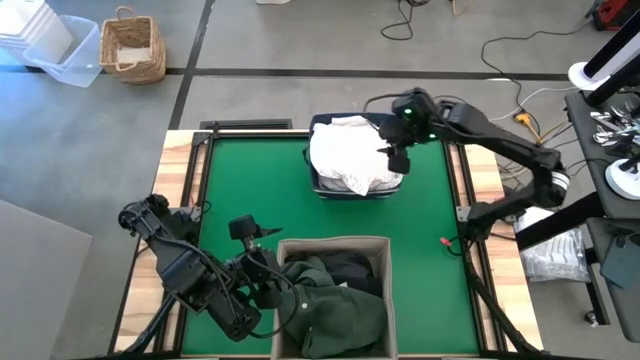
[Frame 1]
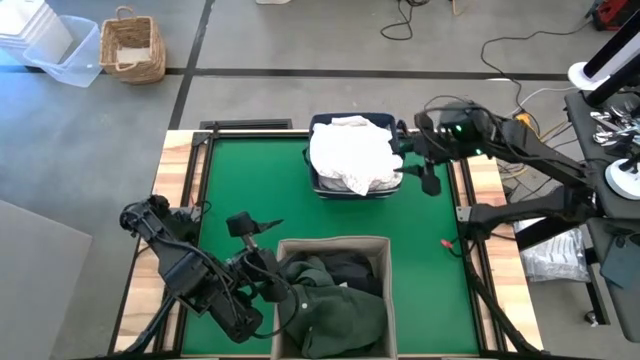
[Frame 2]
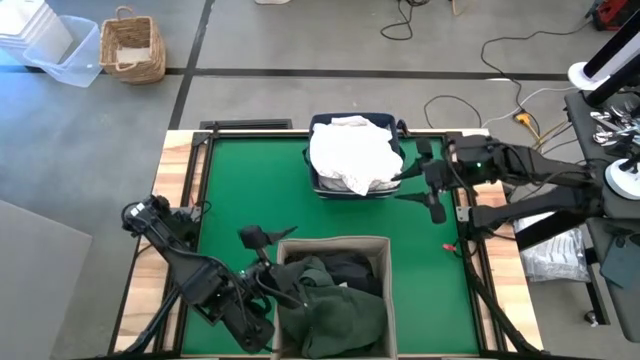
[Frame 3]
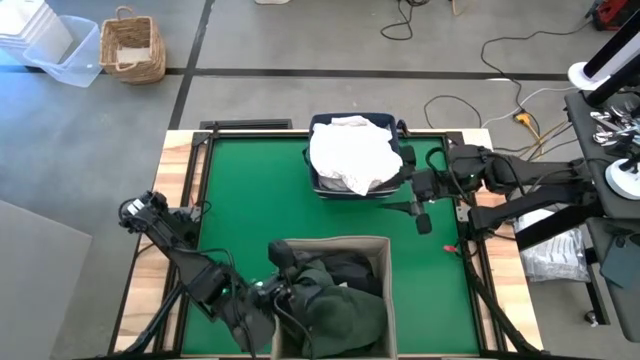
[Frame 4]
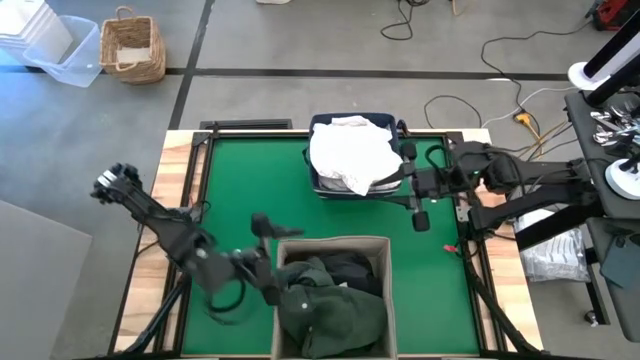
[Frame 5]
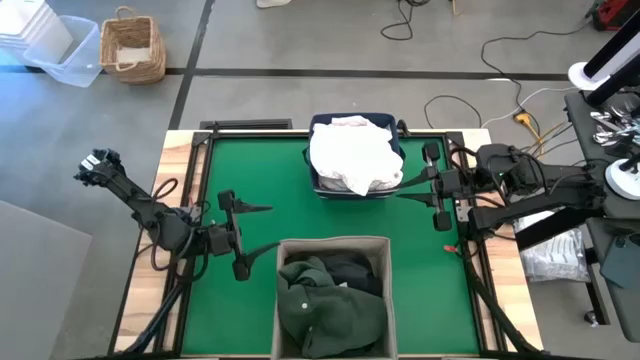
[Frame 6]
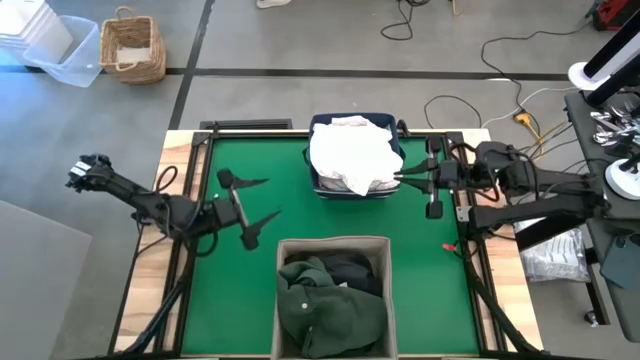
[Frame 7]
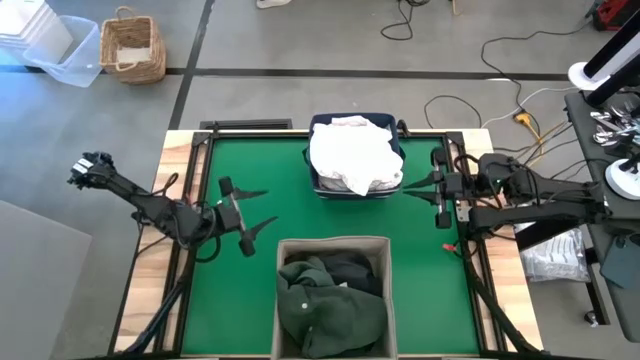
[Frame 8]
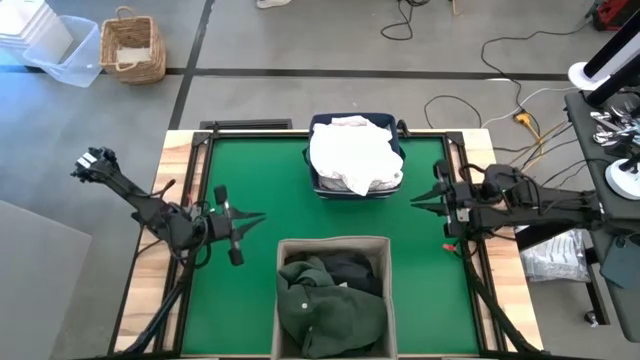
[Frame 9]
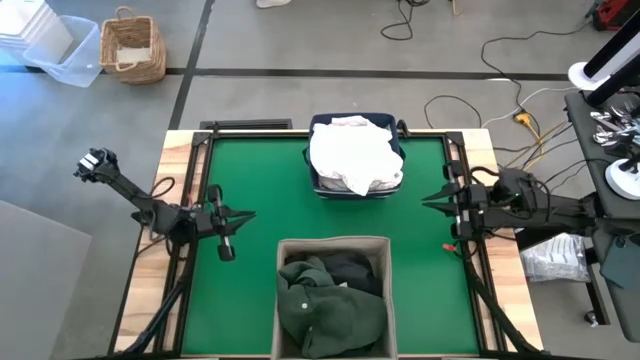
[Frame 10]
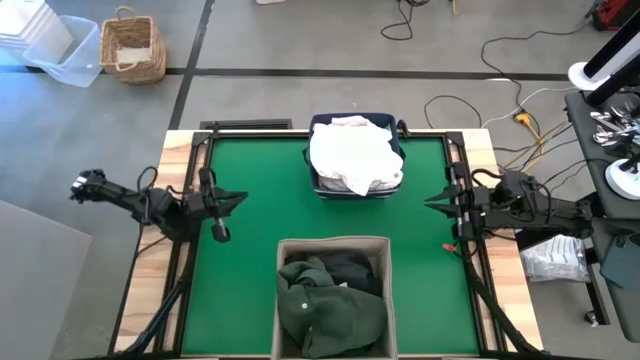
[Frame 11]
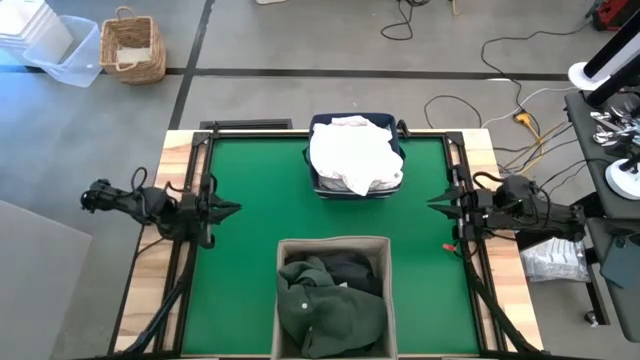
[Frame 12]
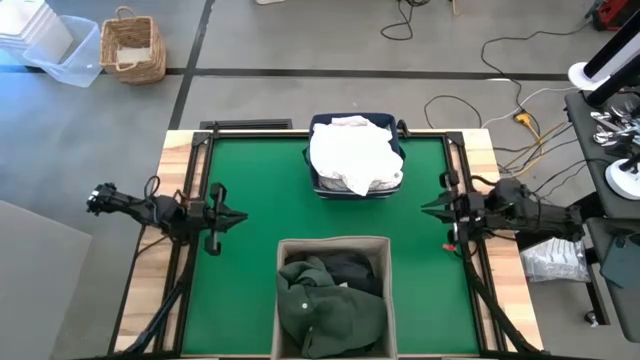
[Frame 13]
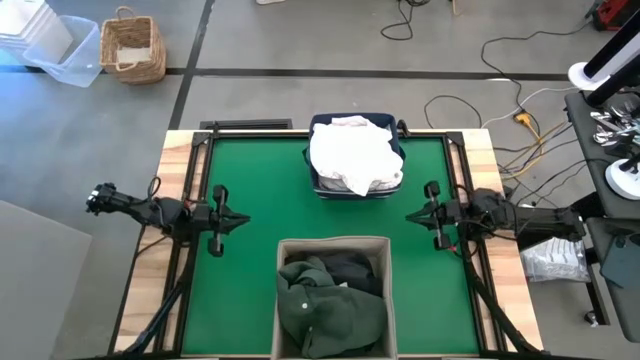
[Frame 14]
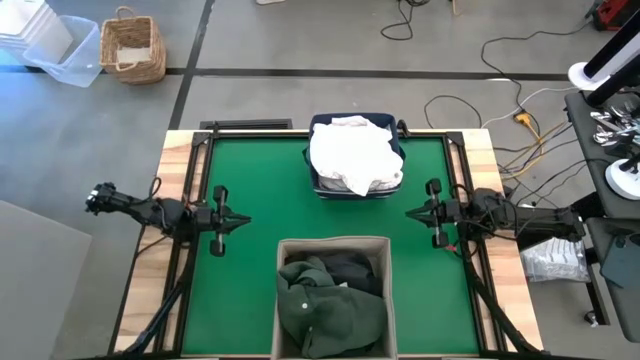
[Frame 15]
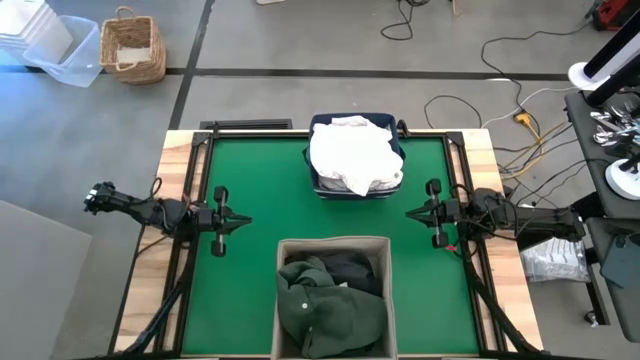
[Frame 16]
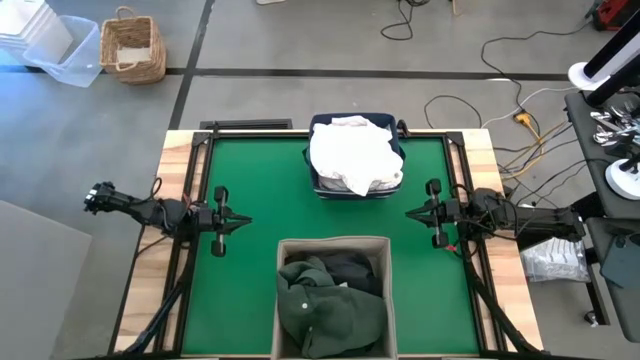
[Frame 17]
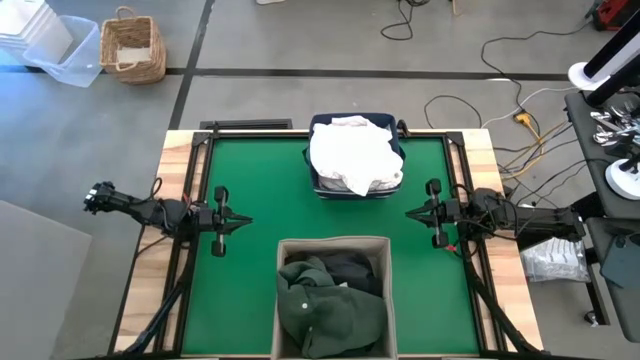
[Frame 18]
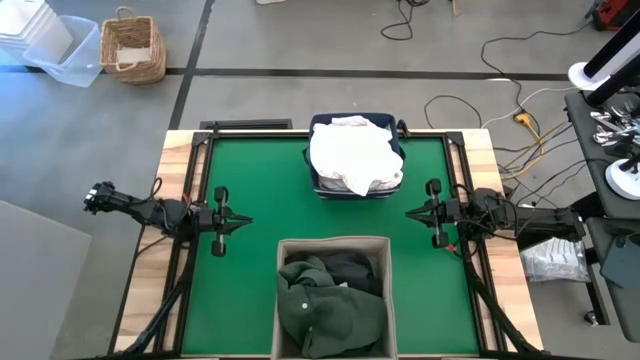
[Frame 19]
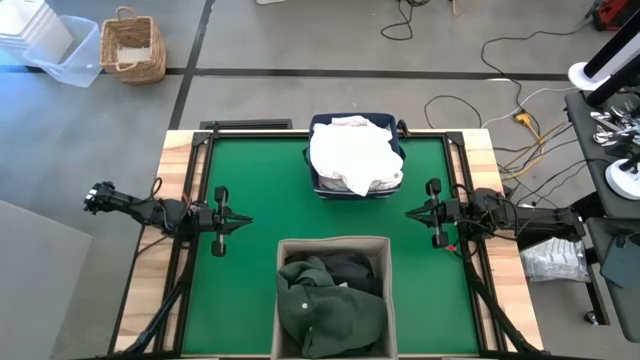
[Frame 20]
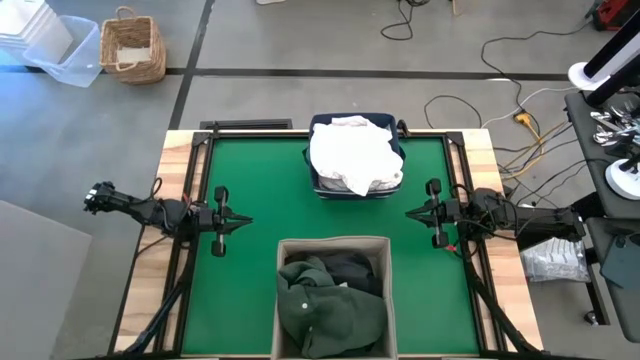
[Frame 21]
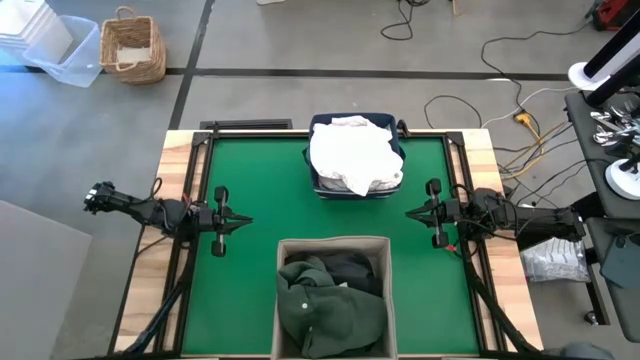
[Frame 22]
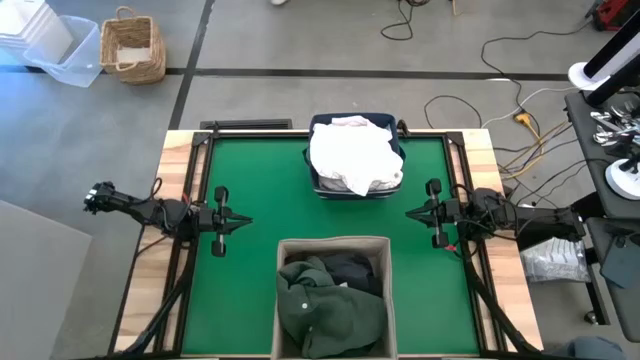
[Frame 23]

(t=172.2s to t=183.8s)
Return to Home Position

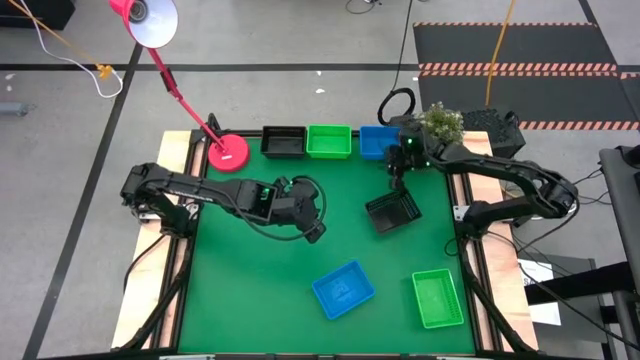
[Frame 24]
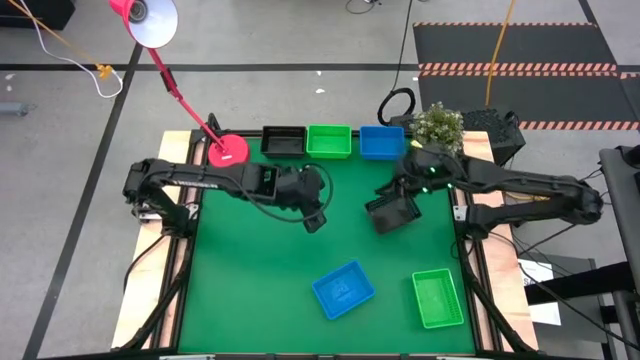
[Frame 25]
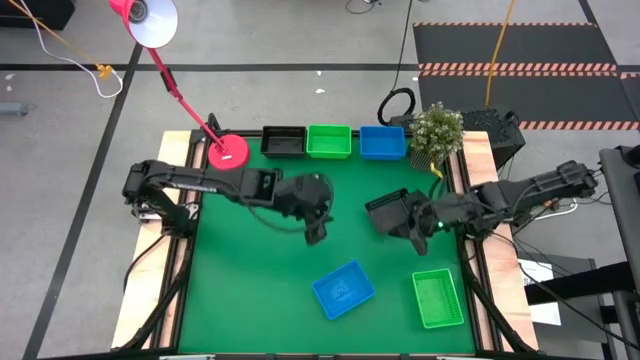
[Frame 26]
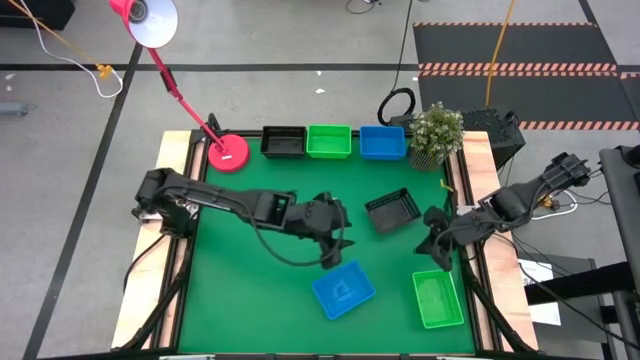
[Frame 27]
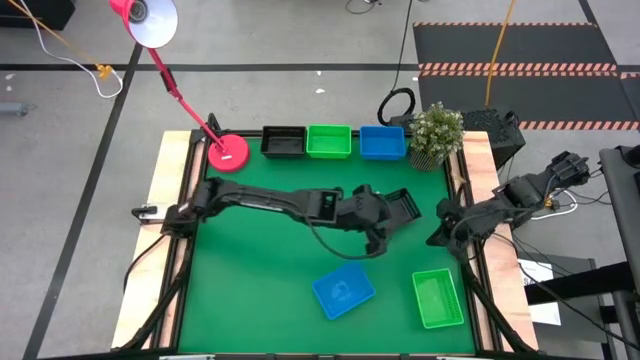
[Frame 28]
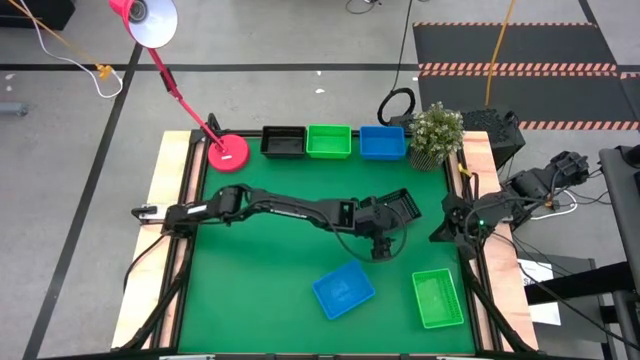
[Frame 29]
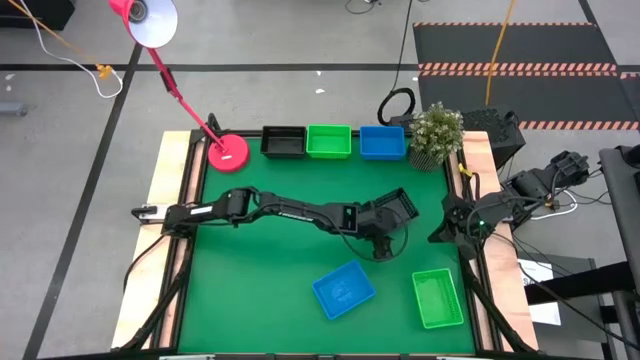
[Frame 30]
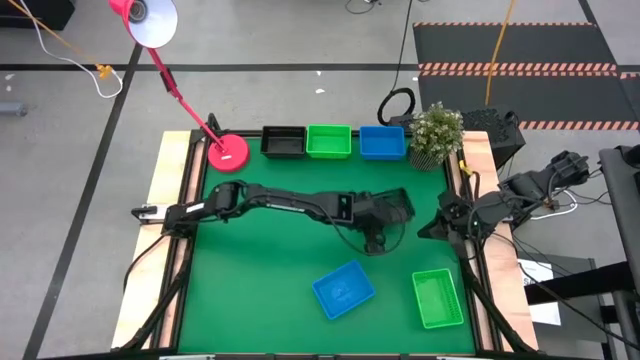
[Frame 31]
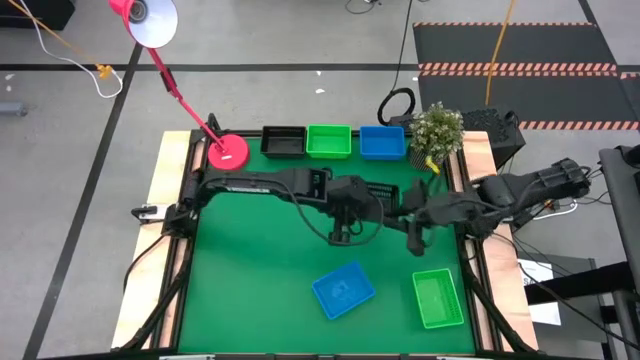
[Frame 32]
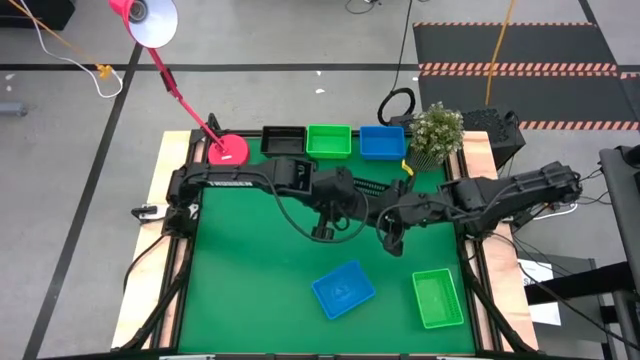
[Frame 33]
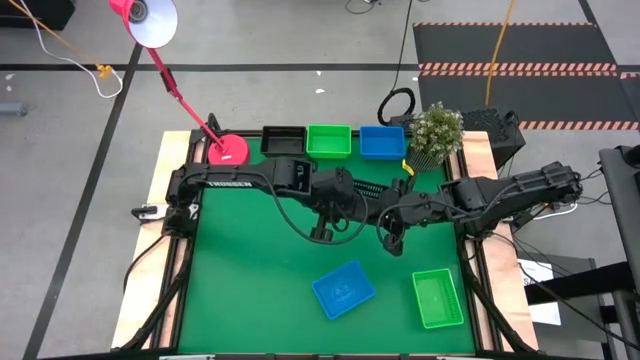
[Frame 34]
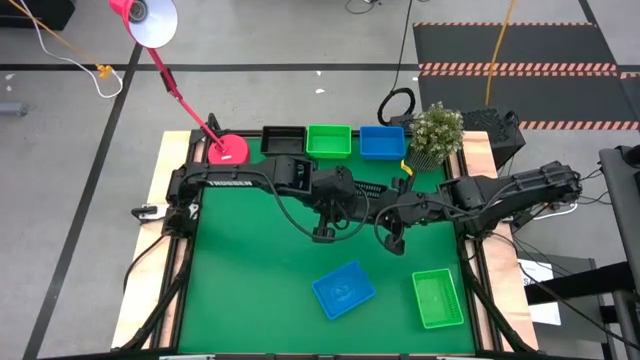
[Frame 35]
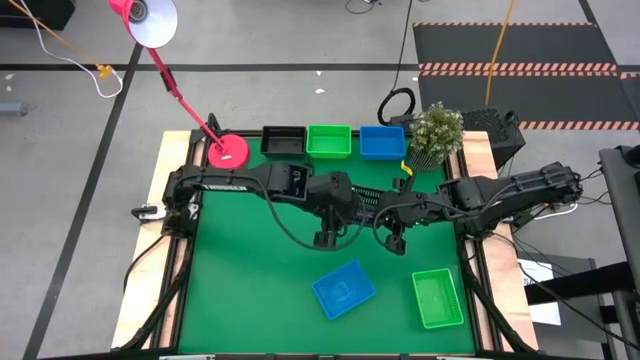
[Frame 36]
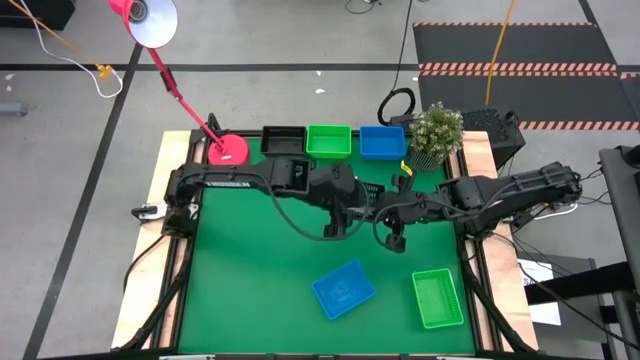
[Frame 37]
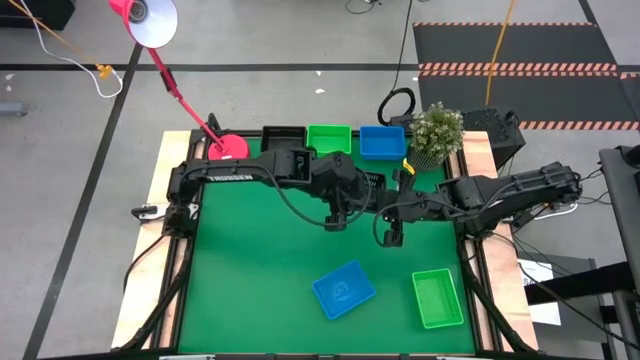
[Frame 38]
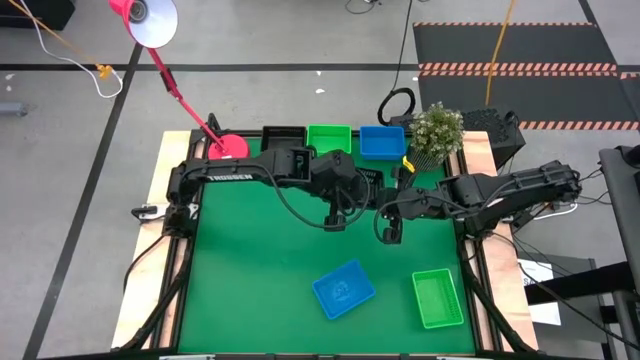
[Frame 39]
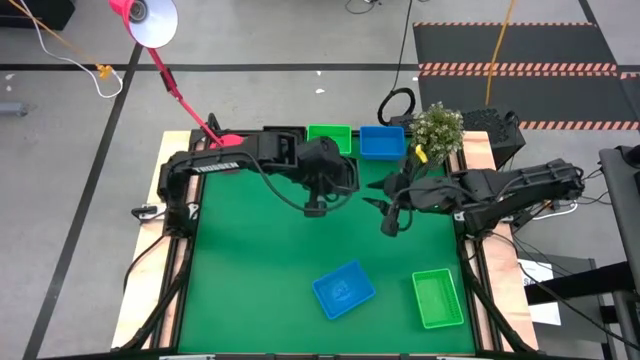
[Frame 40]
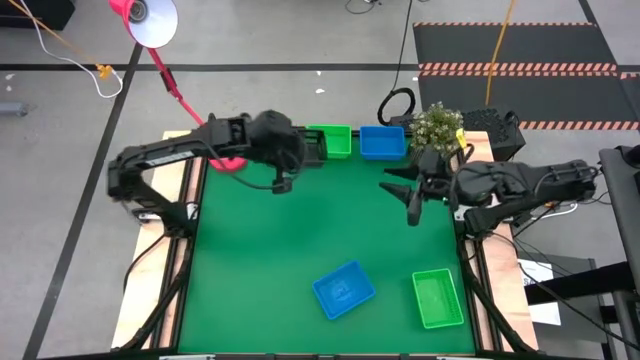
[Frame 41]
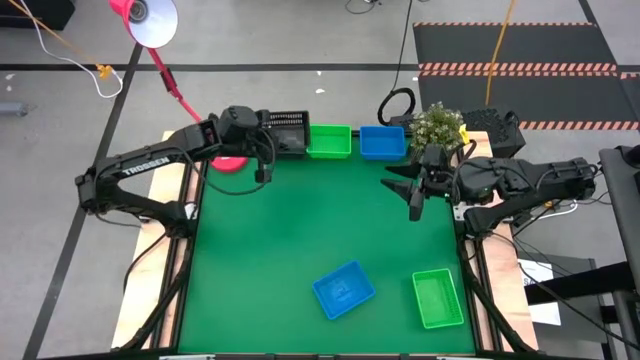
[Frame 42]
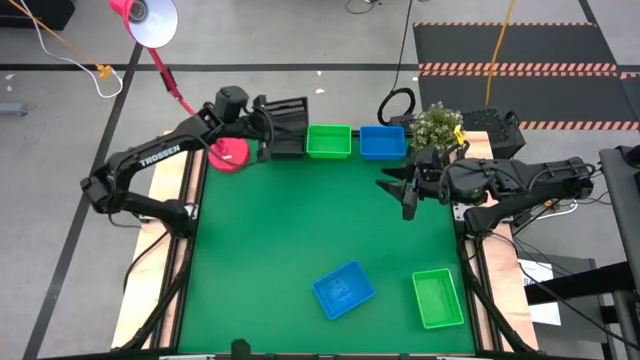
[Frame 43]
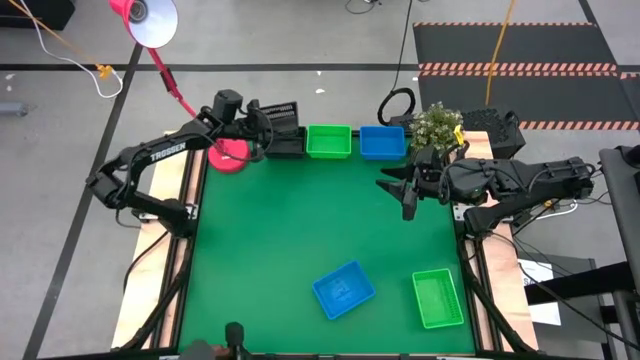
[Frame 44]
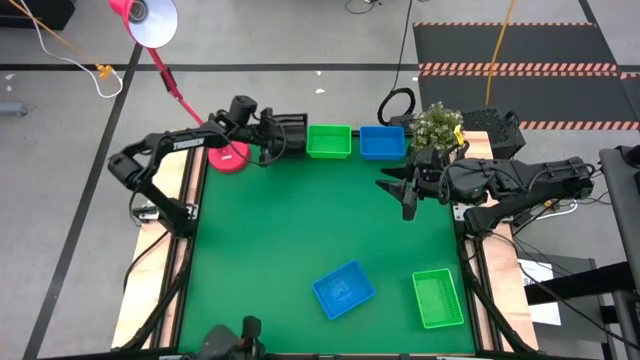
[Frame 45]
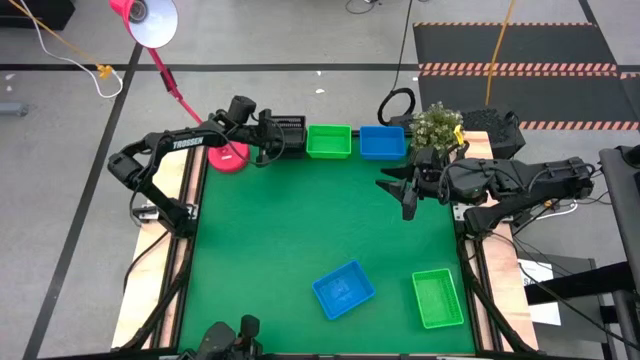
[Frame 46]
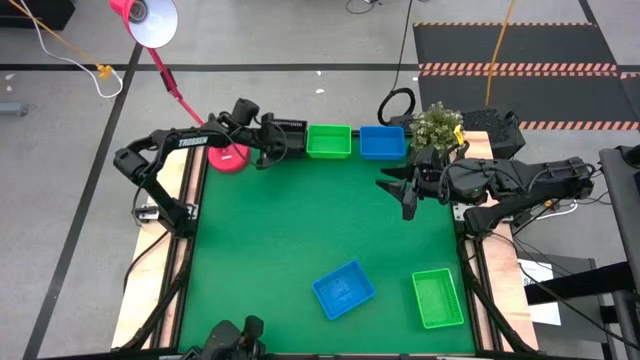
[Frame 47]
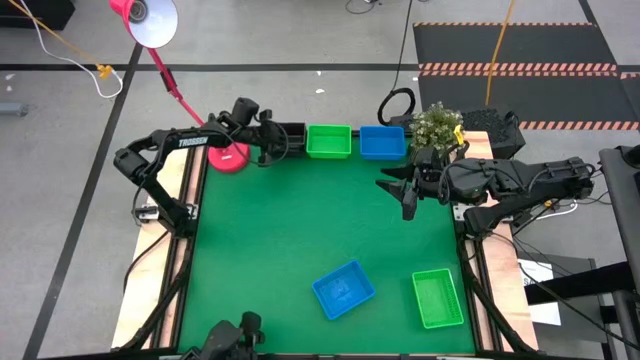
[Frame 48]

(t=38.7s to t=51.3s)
Stack the right black bin on the top left stacked black bin
